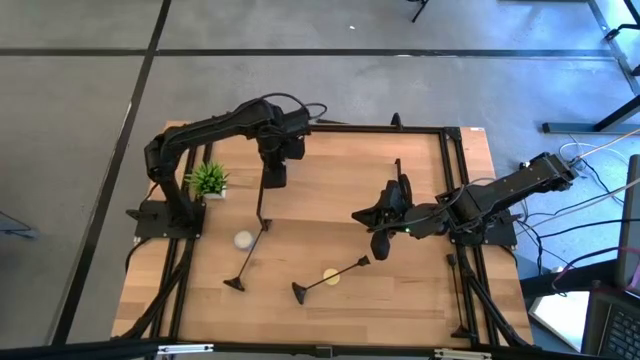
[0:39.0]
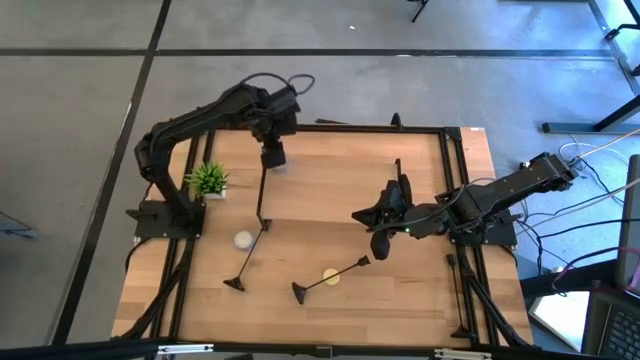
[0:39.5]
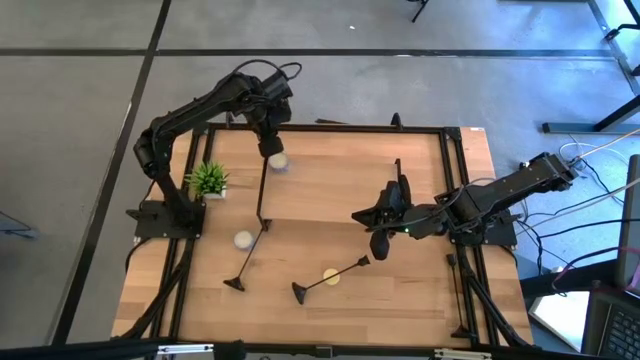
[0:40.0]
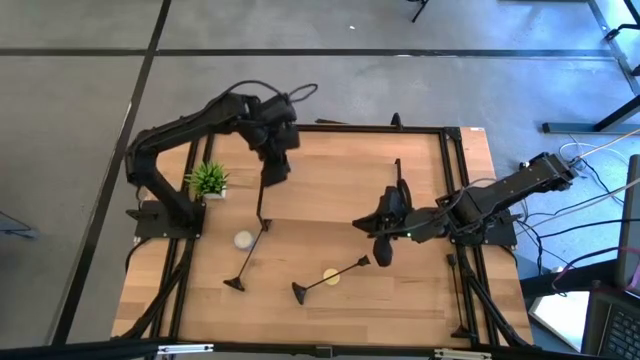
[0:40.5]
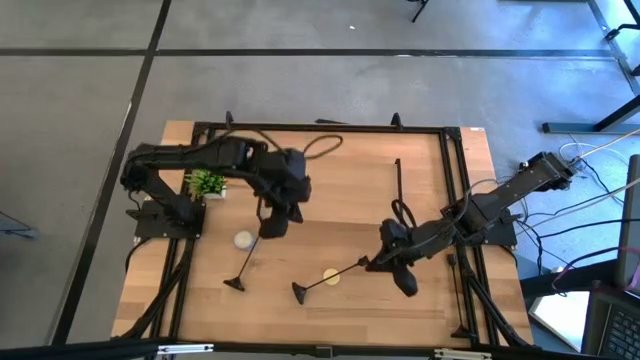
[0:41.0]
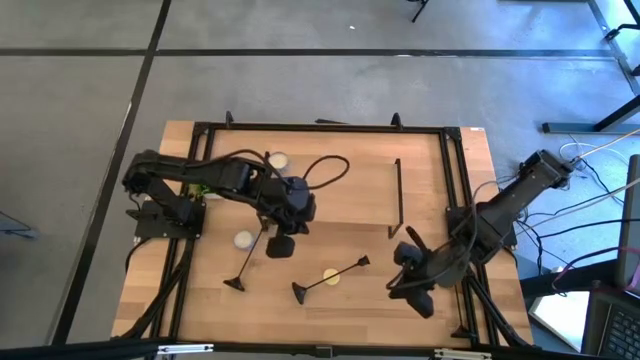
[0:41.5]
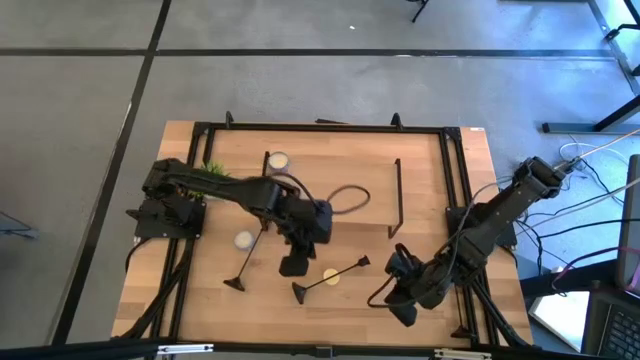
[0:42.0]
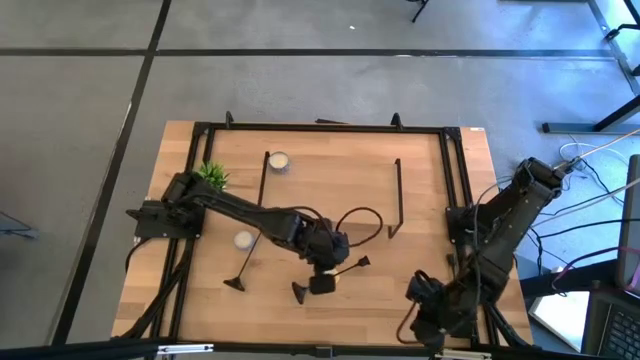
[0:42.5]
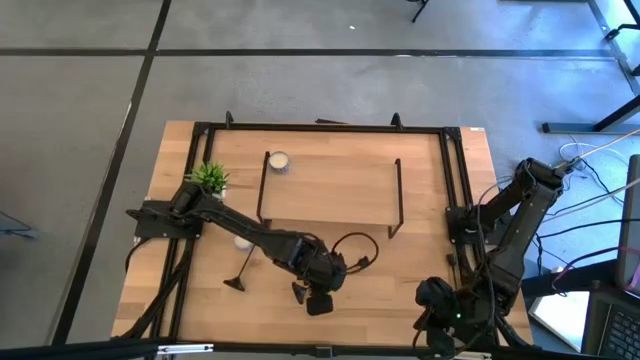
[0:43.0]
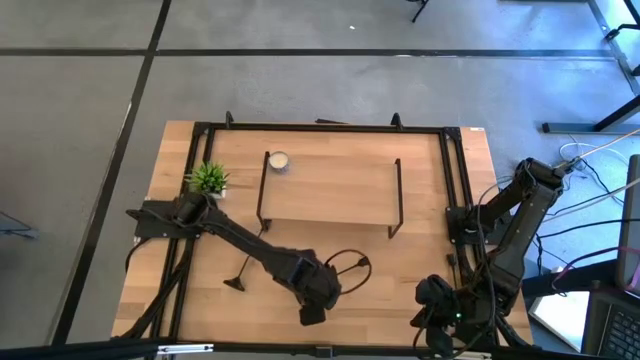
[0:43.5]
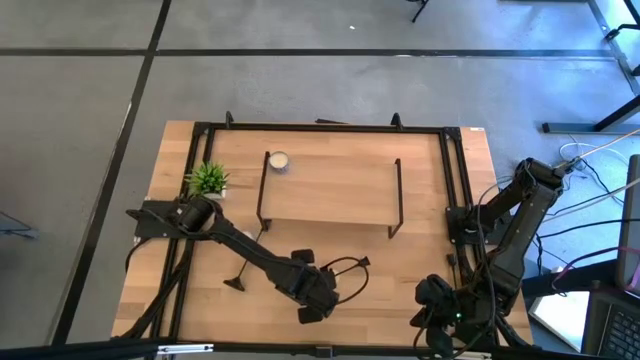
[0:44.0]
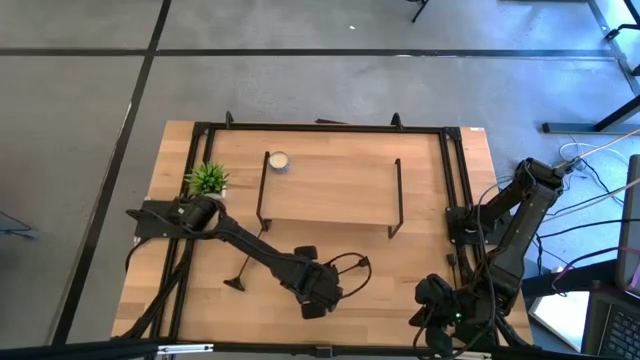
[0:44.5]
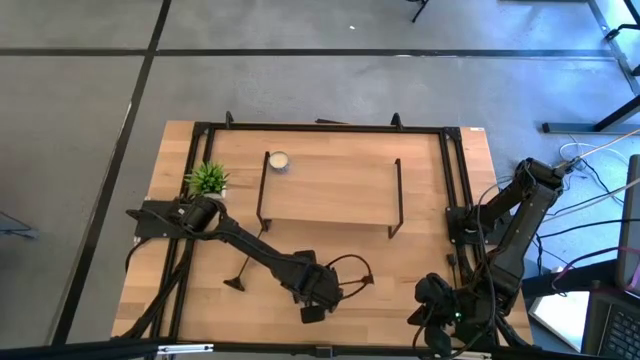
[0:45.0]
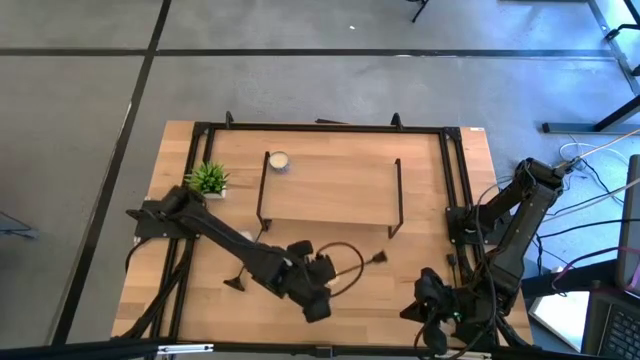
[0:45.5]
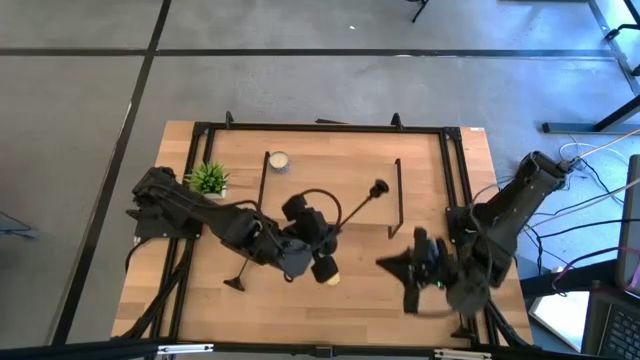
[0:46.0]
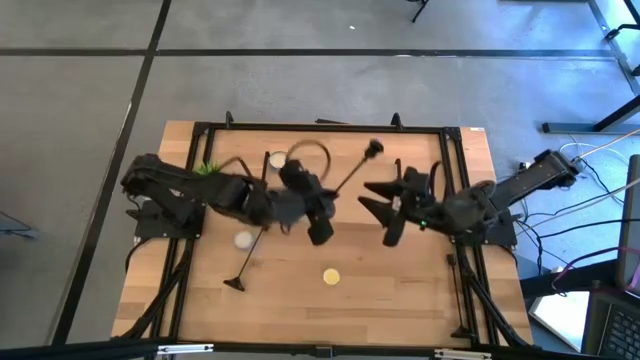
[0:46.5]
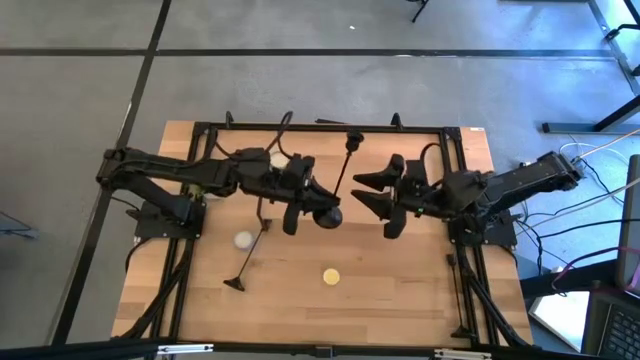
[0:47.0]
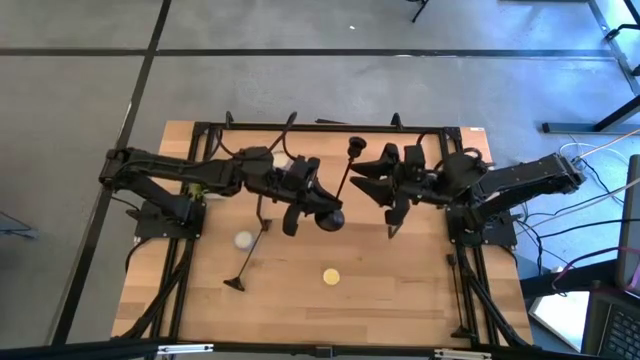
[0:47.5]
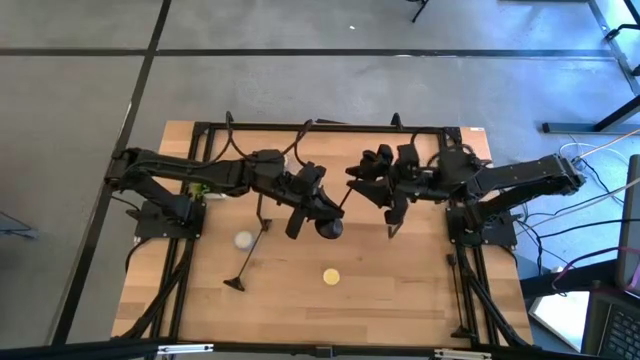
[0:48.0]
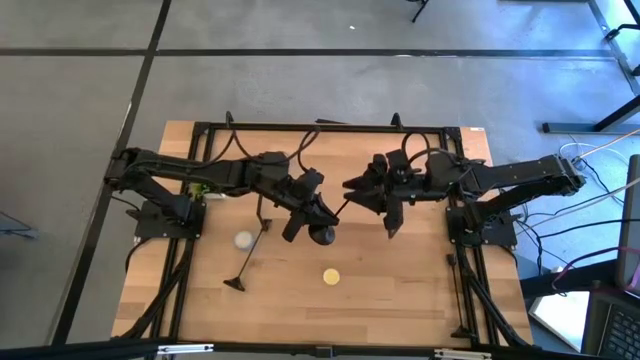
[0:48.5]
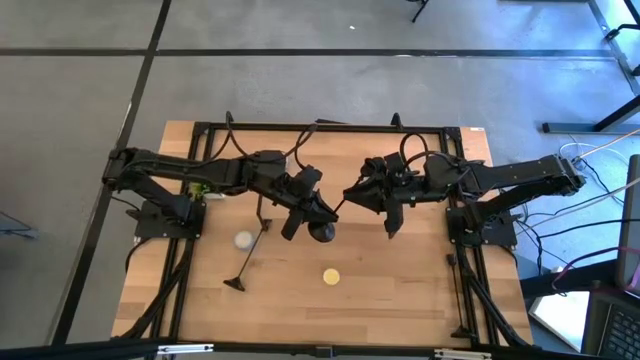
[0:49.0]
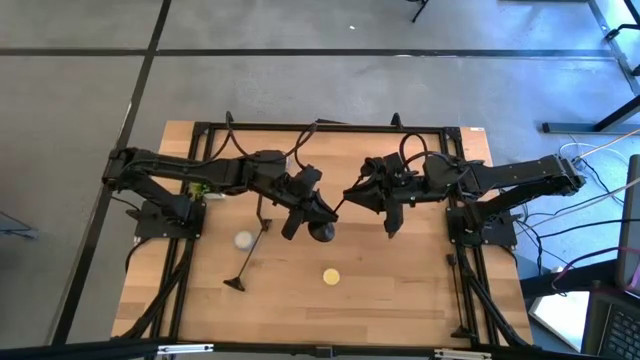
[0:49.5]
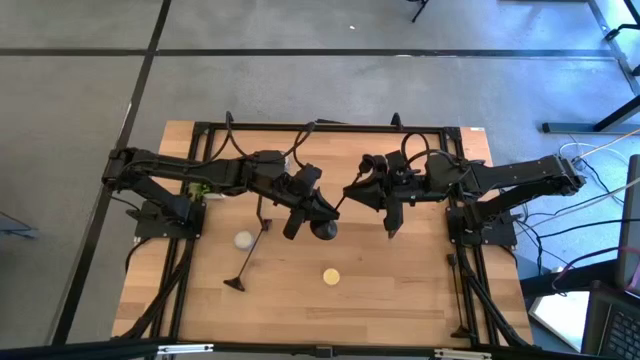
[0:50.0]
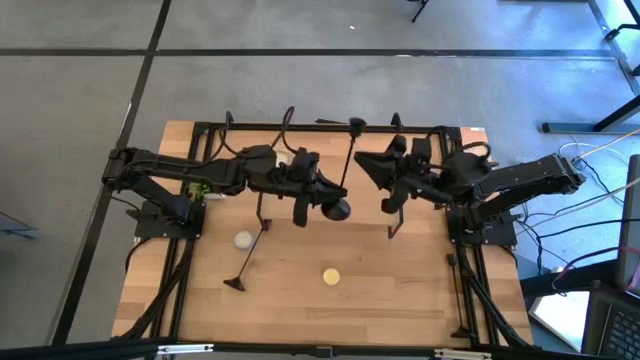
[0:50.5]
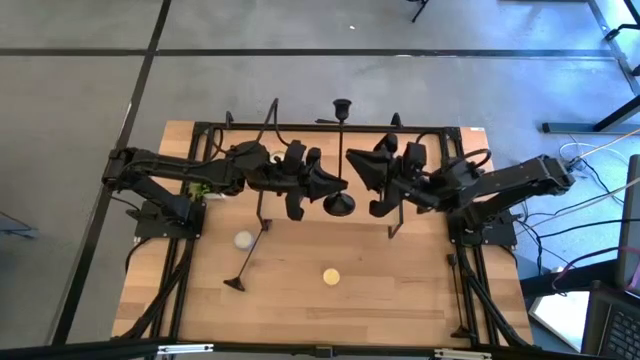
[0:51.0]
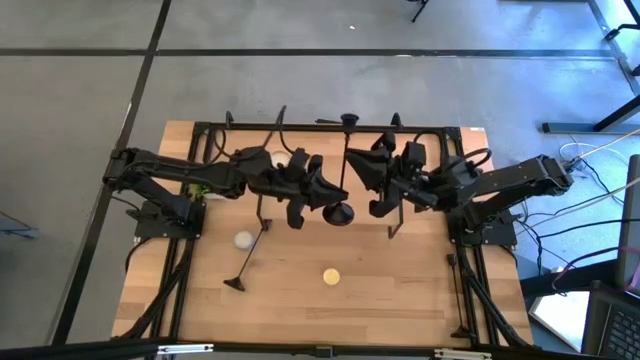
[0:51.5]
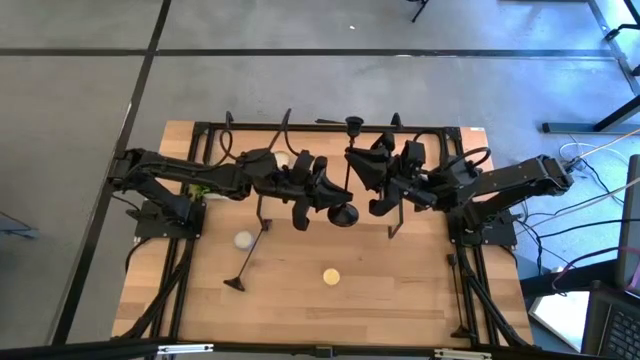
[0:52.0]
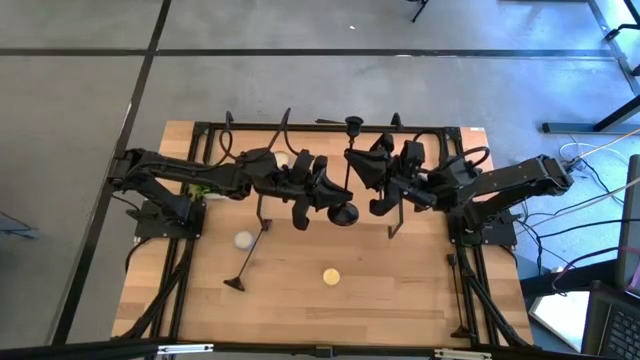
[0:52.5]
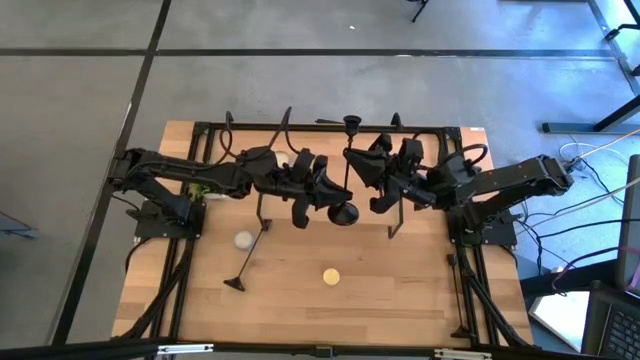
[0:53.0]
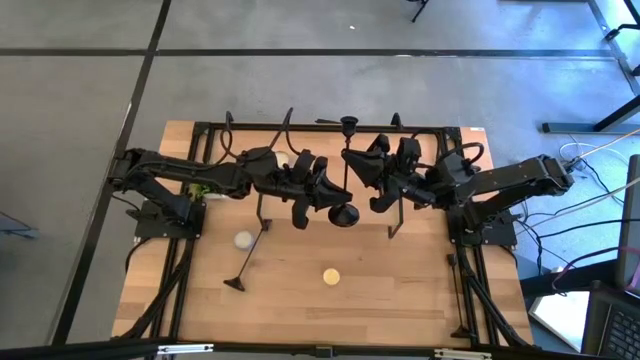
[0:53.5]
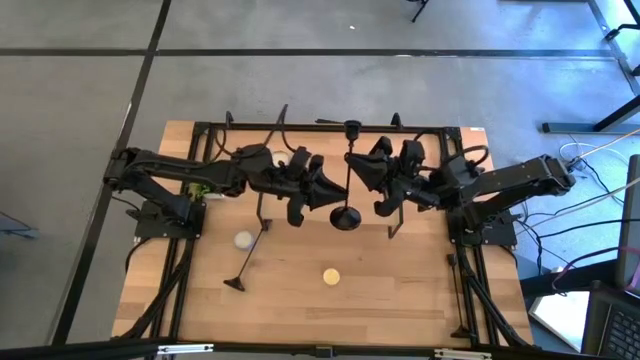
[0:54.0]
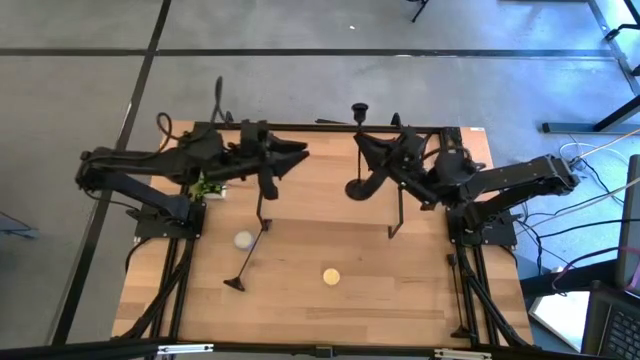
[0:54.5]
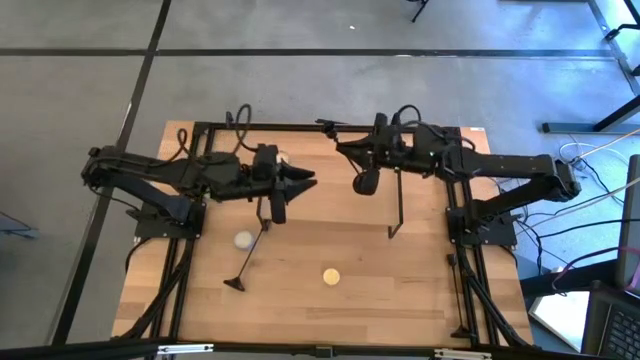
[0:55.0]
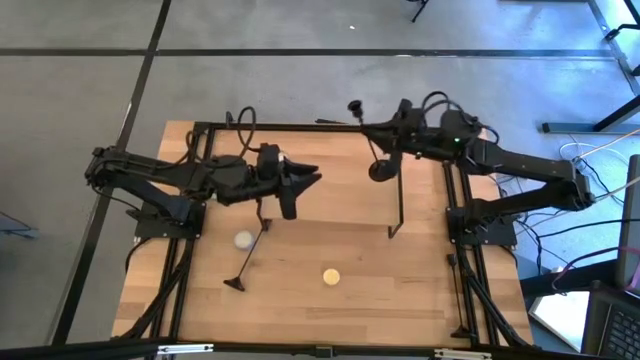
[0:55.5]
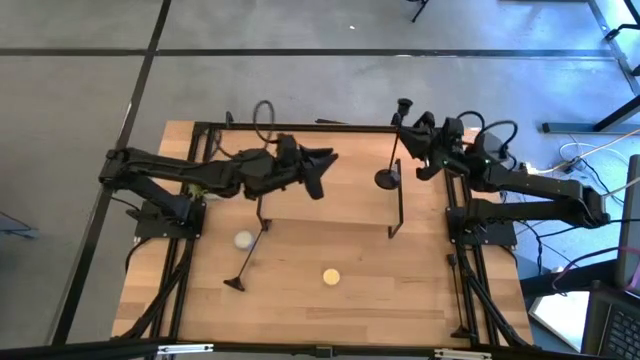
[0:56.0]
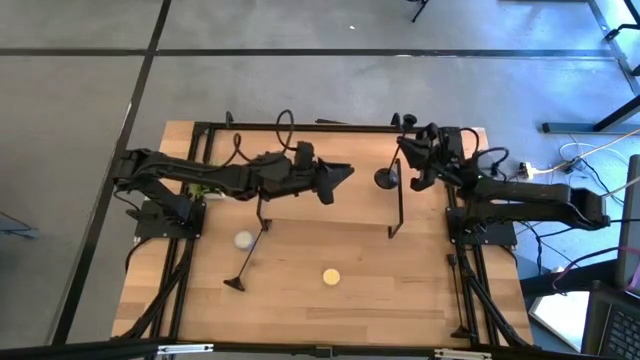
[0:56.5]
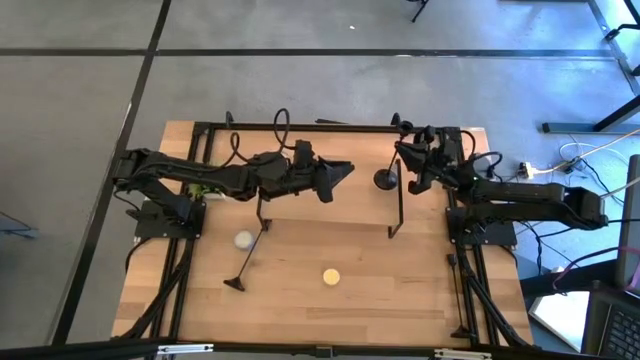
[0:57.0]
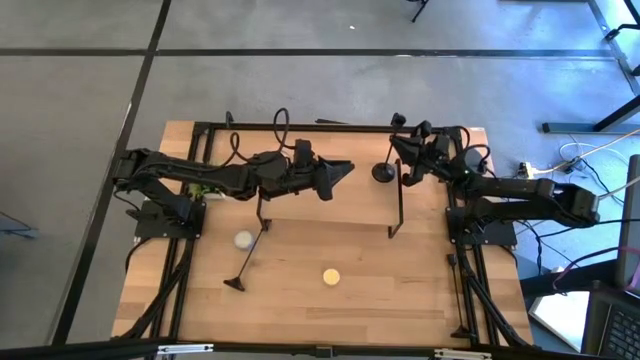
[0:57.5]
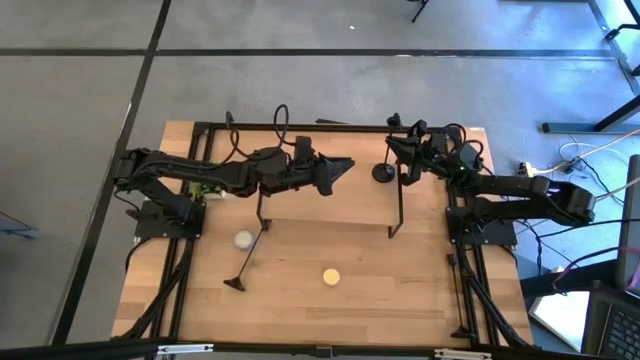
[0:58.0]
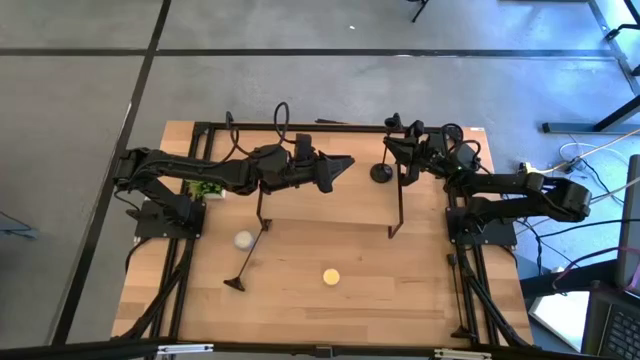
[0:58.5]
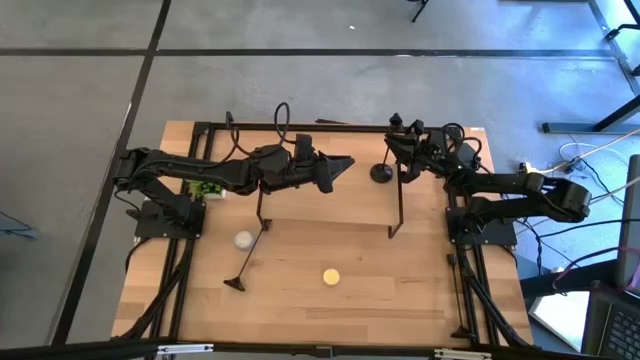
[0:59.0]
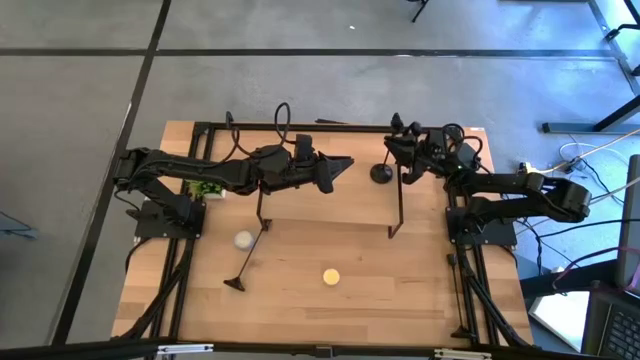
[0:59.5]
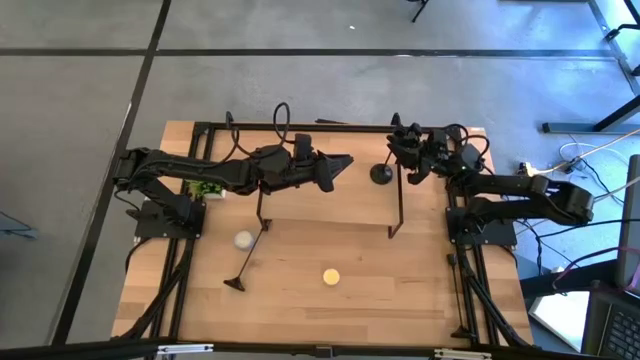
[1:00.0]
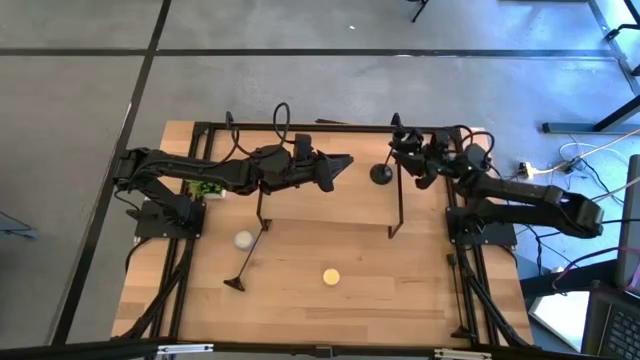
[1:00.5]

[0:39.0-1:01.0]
Task: Pick & Place candle stick holders
Put the middle black candle holder on the shelf
